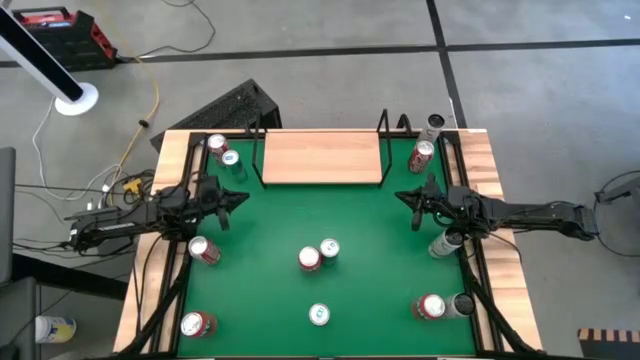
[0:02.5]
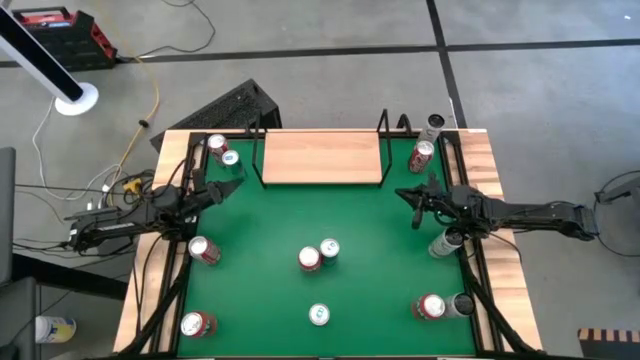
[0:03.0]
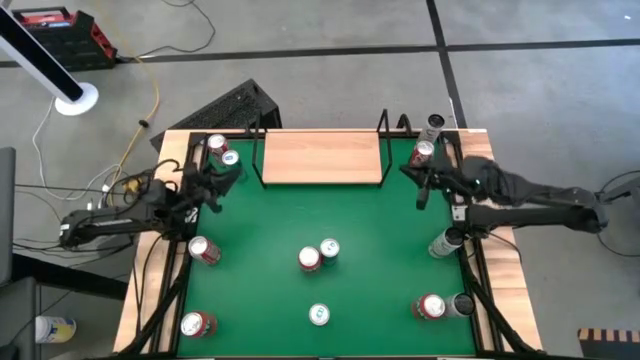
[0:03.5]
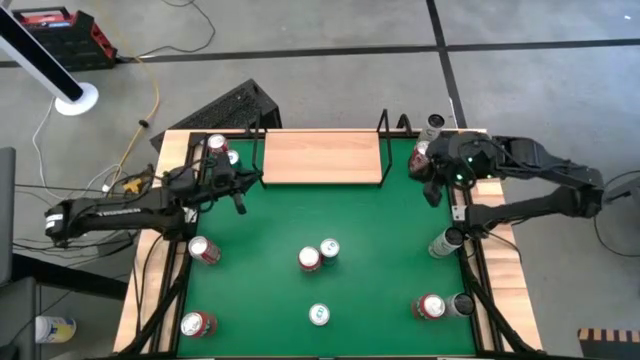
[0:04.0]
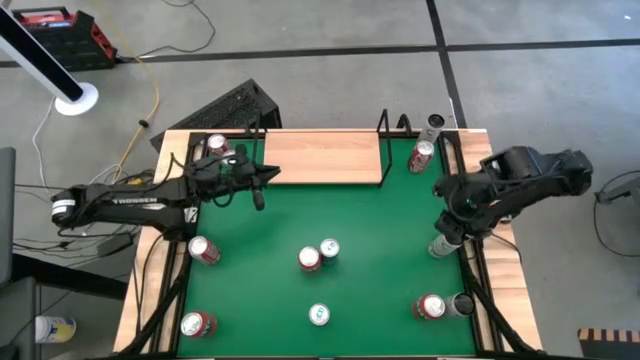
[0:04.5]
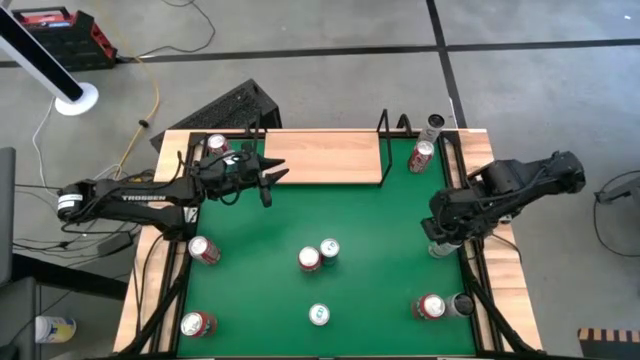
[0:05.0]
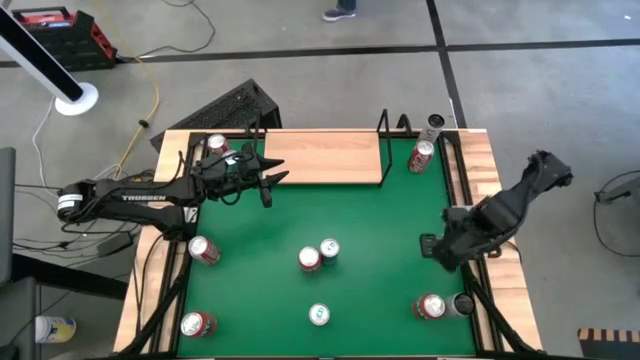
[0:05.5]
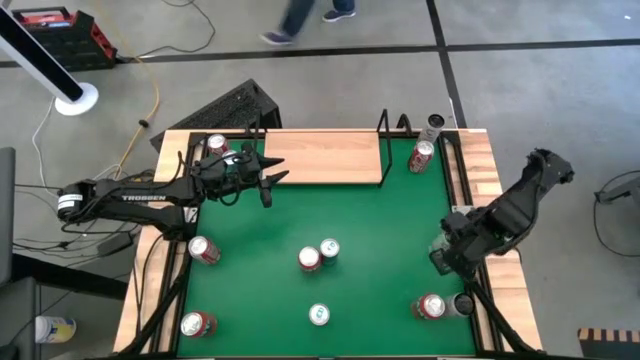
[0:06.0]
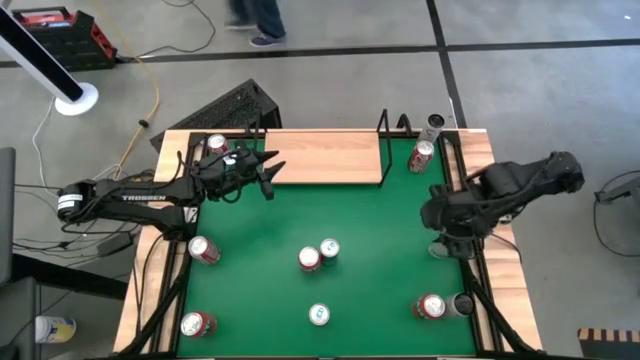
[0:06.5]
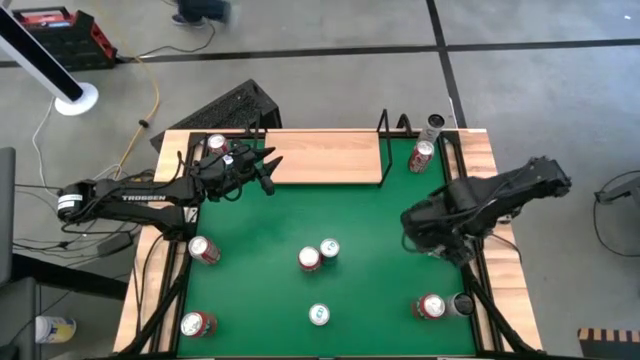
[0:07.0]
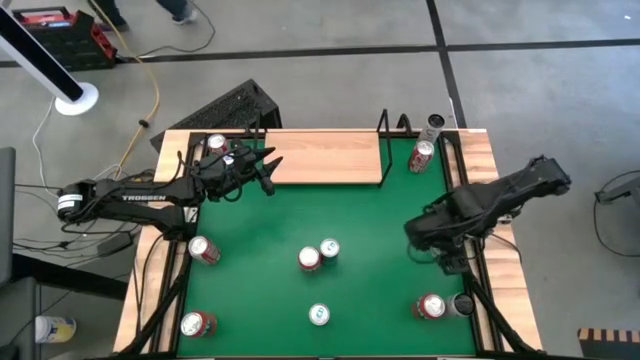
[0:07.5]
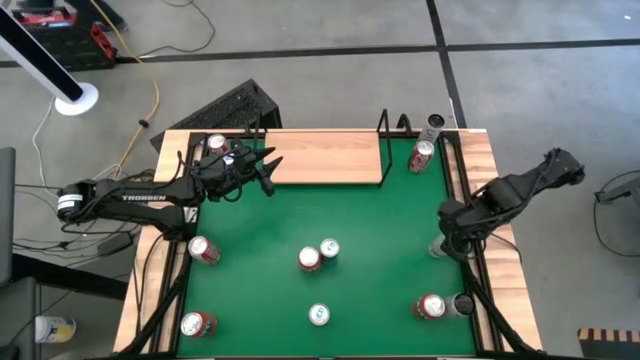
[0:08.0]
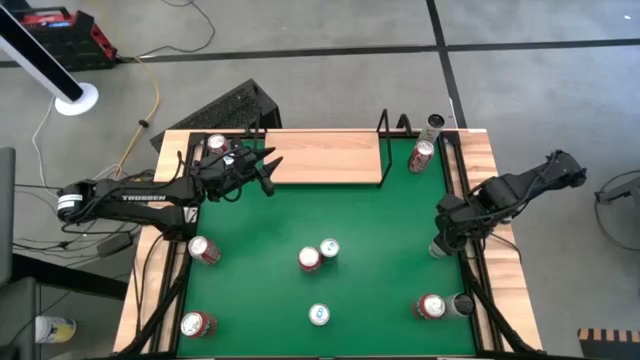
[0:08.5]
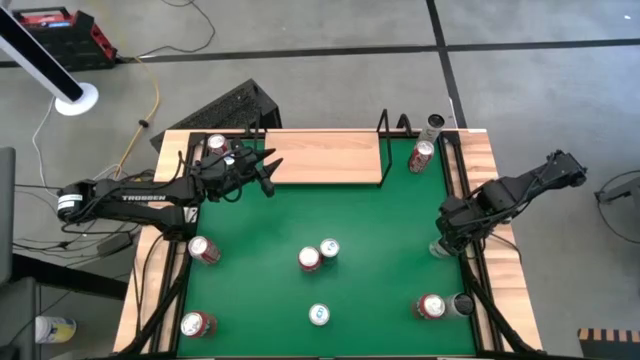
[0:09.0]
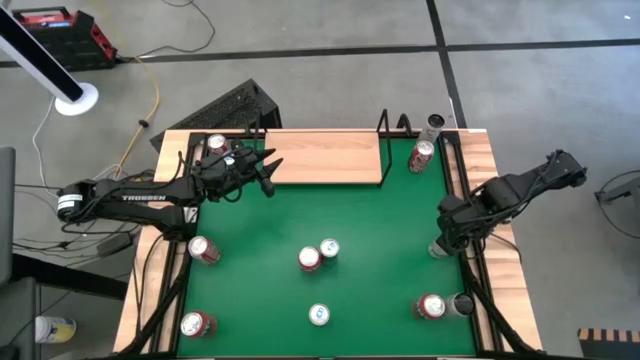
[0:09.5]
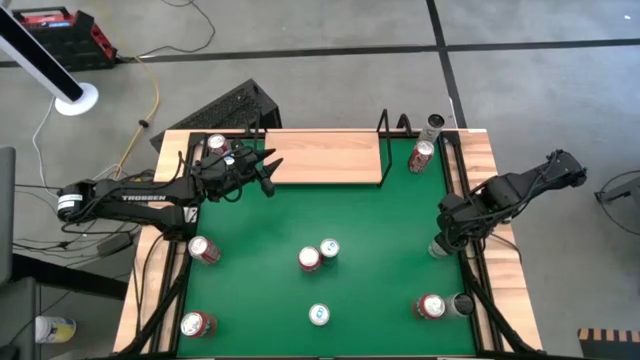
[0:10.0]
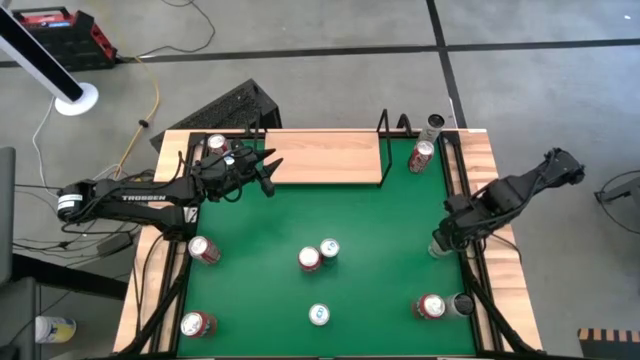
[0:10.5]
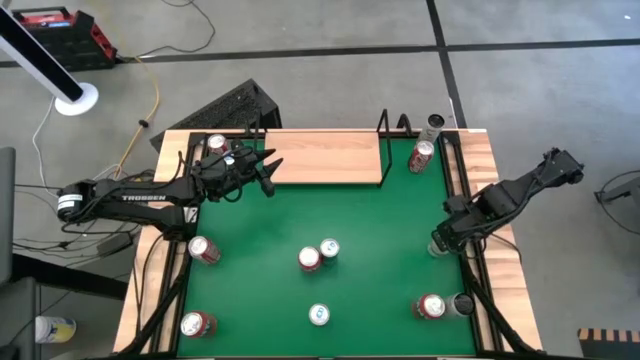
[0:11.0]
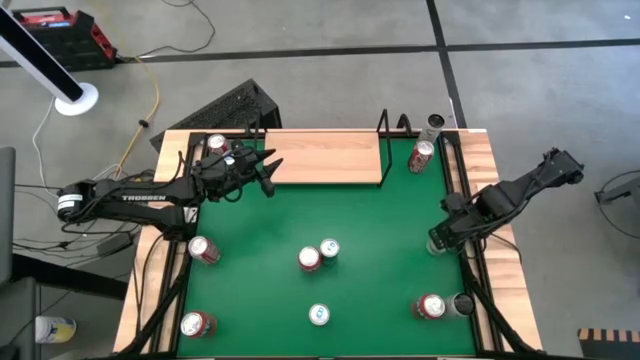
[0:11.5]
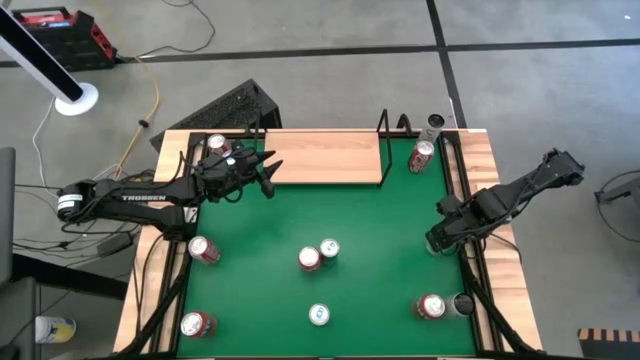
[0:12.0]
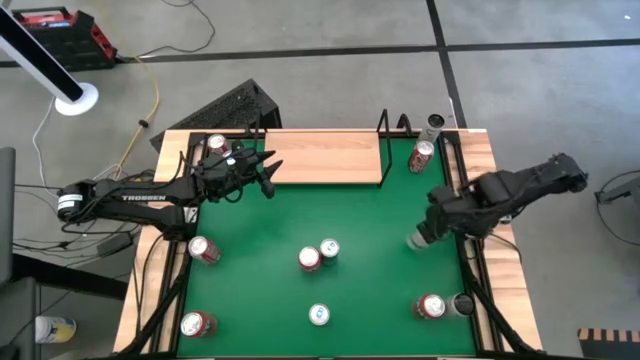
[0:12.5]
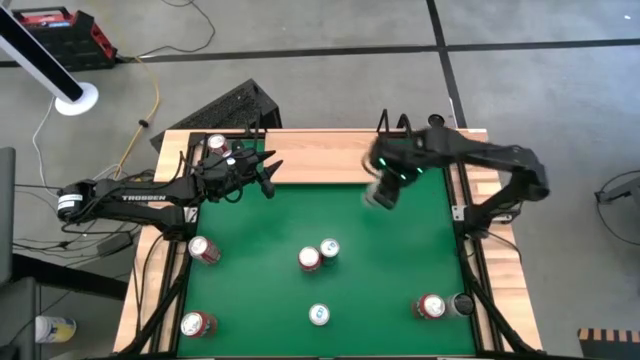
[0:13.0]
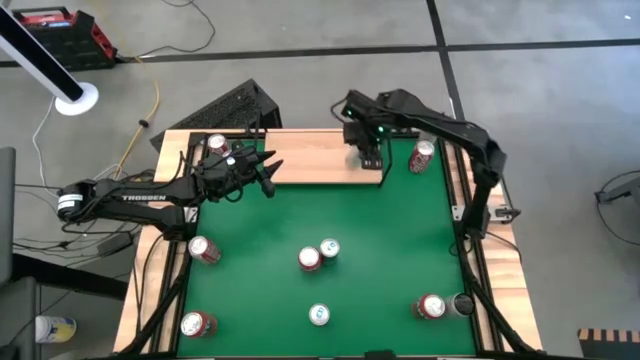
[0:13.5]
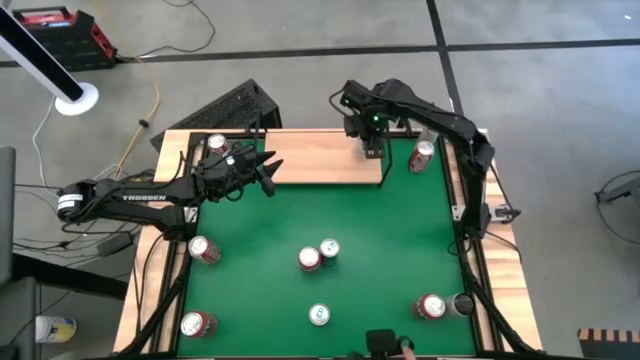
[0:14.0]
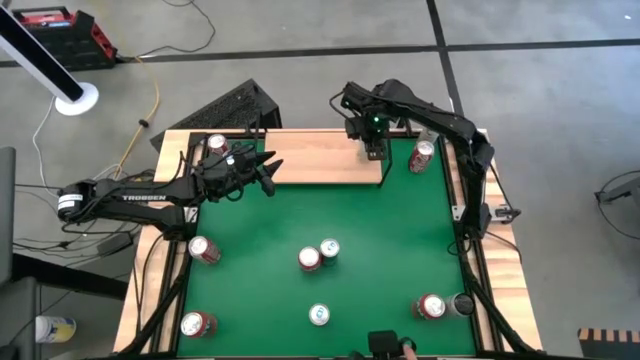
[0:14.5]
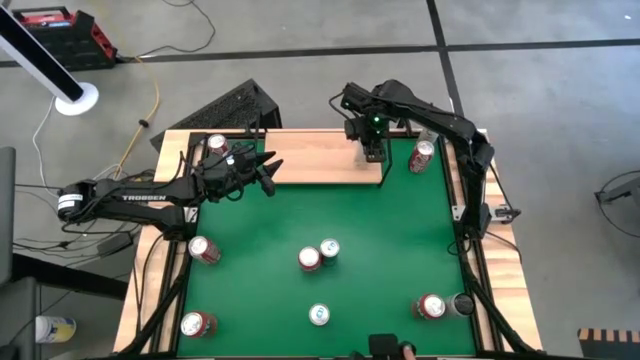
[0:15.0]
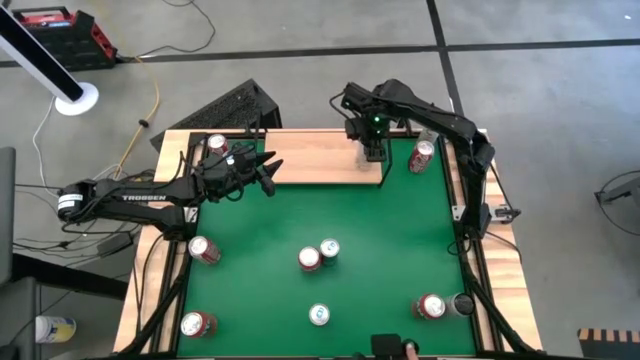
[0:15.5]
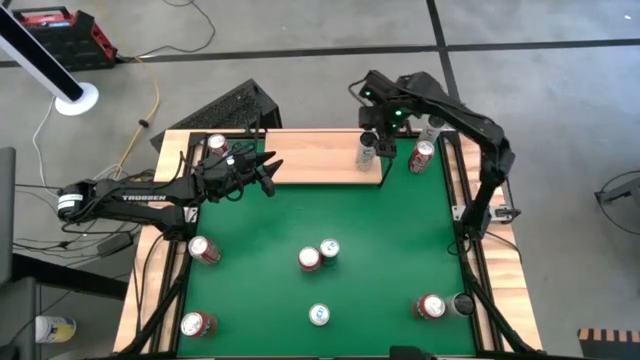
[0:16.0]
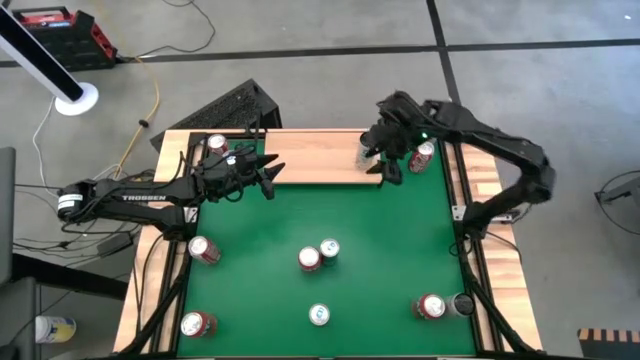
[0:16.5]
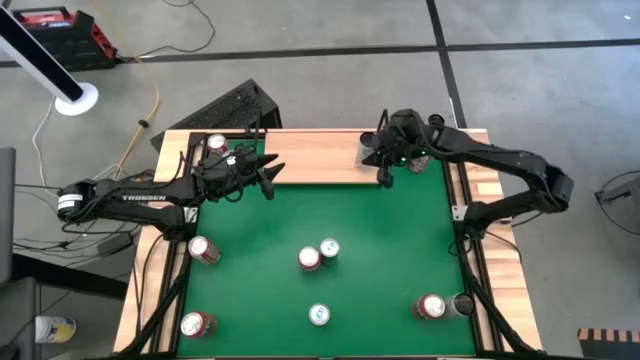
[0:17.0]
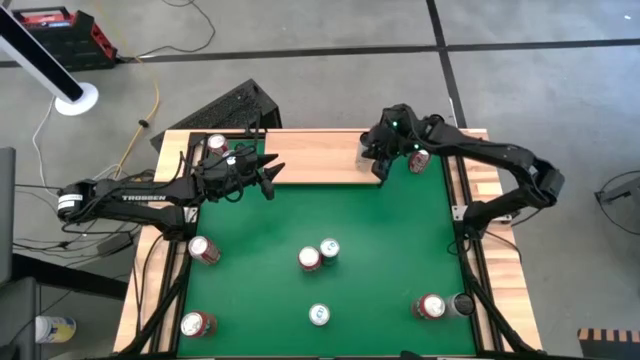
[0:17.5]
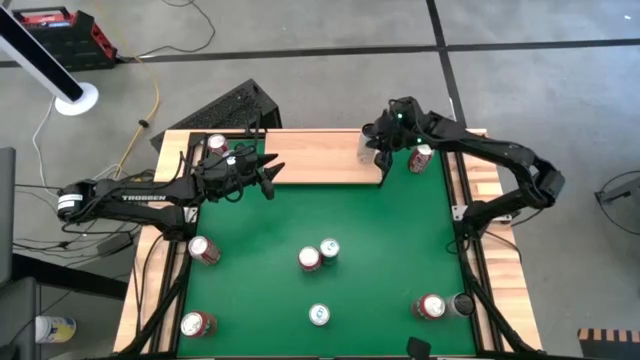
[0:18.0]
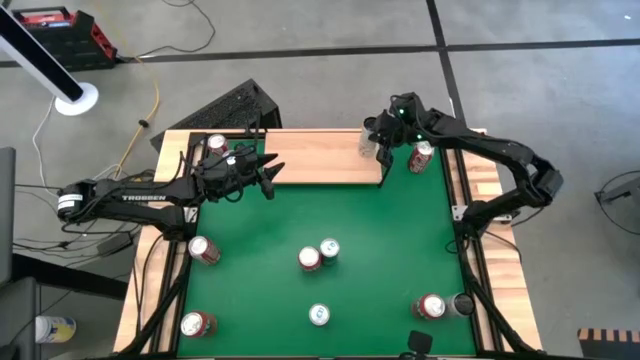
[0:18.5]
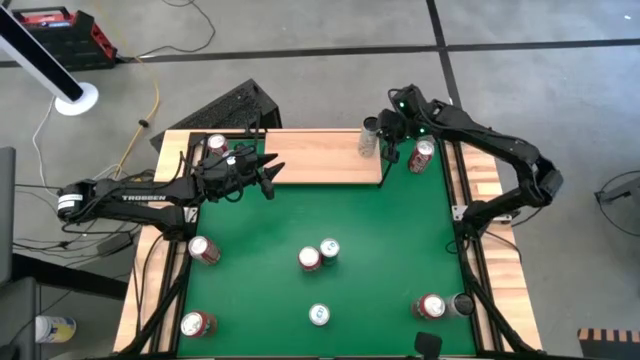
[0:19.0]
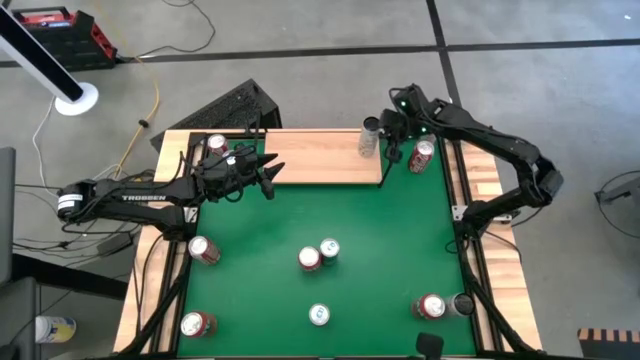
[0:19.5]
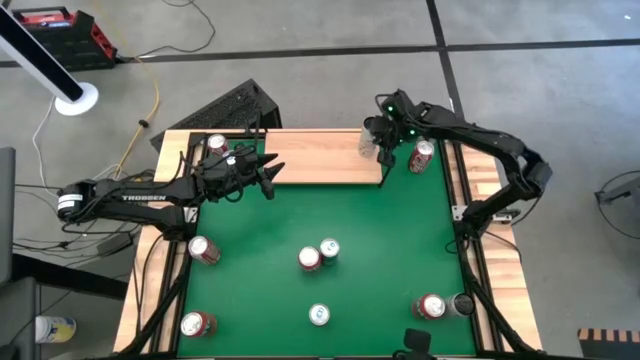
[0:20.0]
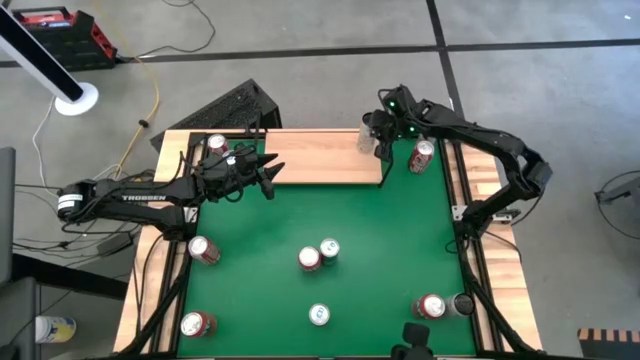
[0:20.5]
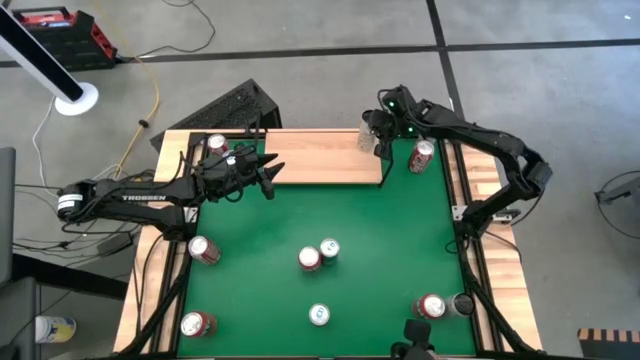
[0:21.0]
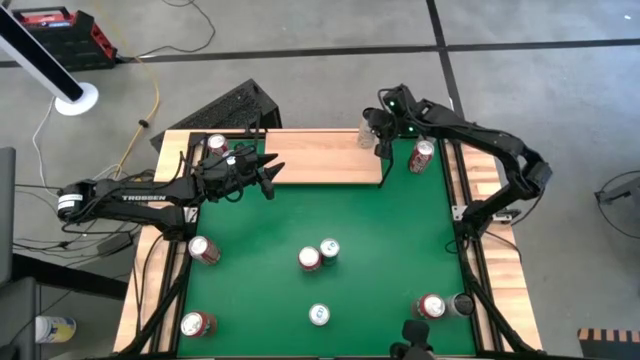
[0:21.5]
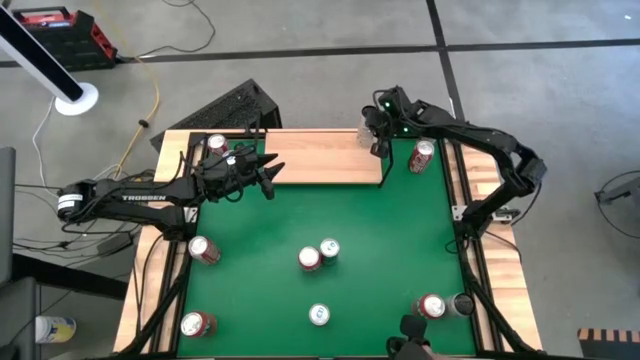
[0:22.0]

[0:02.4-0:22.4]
Task: Place canned beverage on shelf
Put the middle white soda can on the shelf
